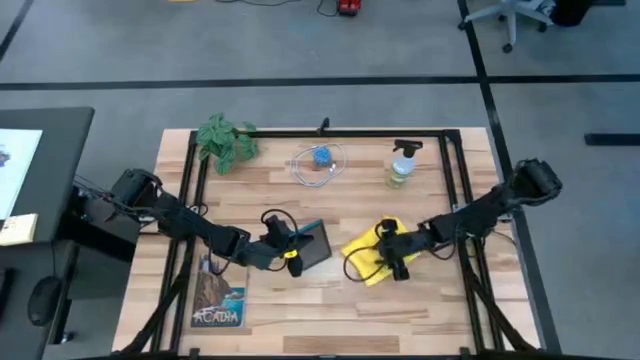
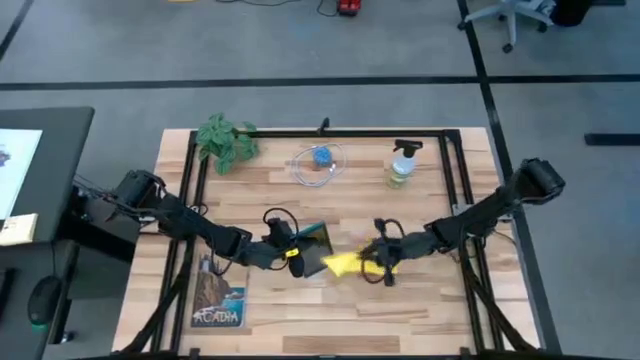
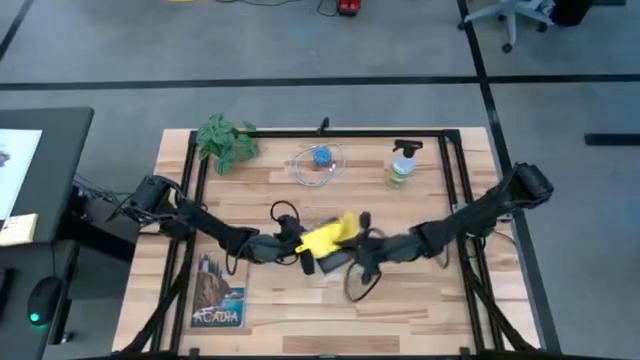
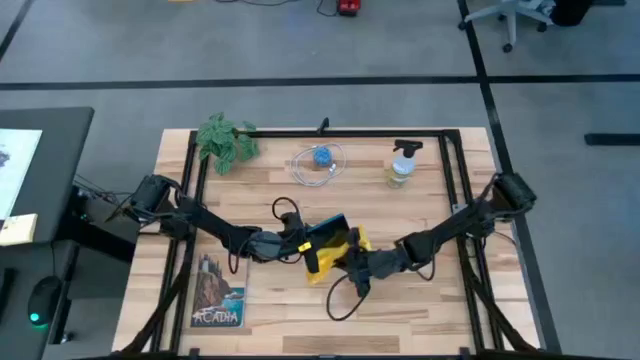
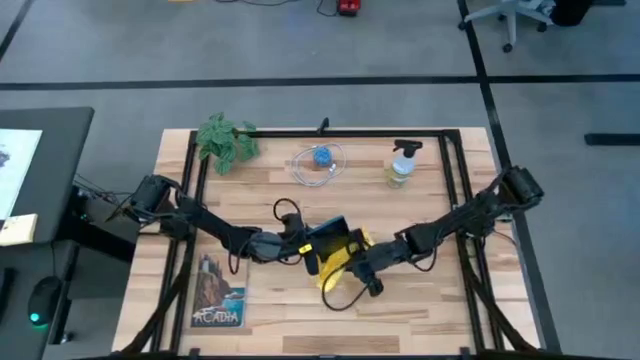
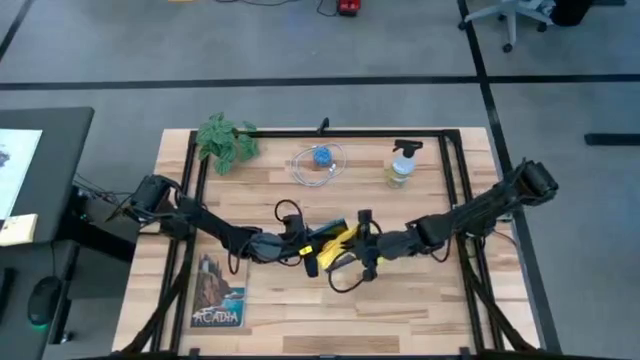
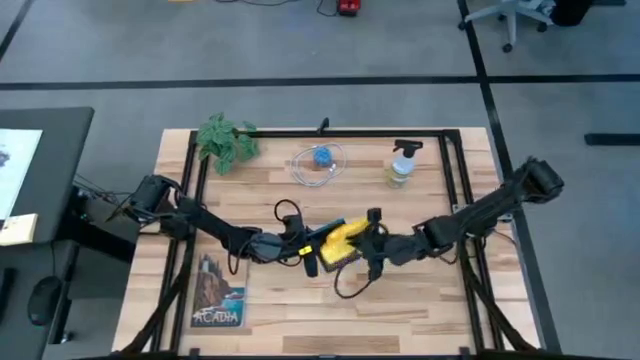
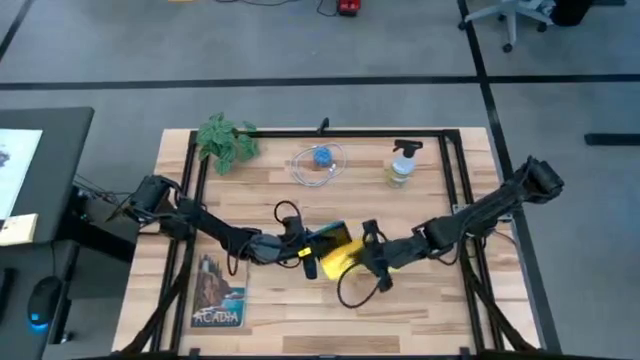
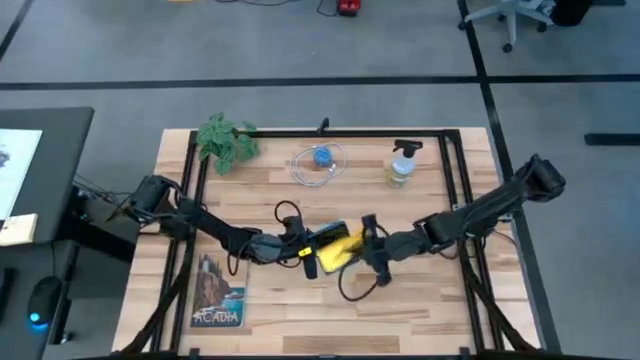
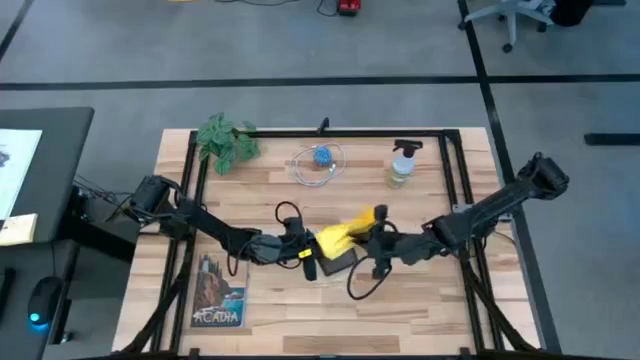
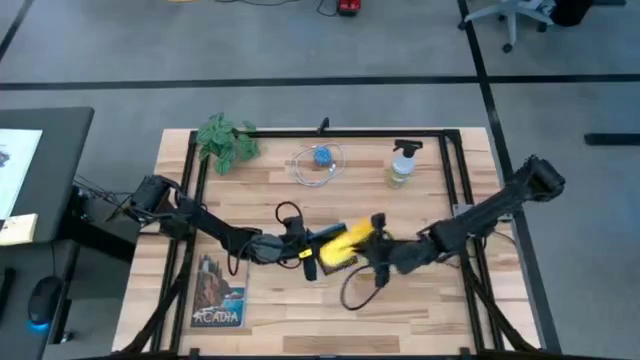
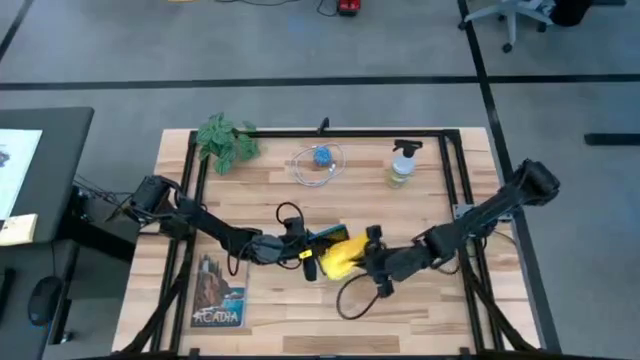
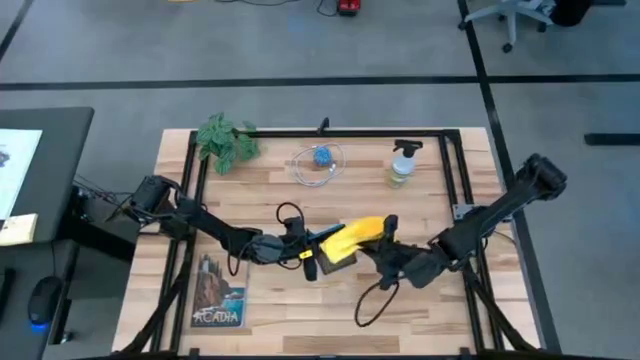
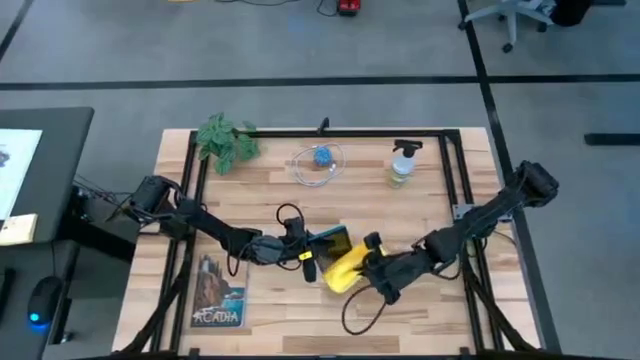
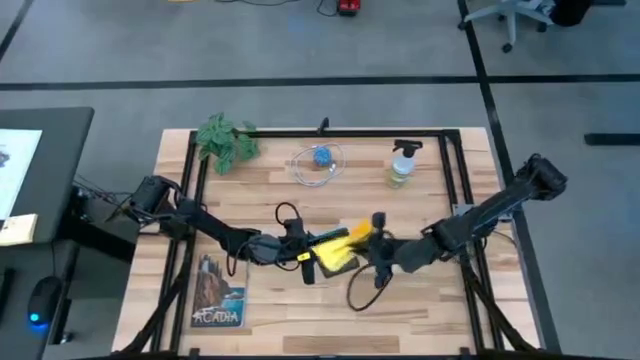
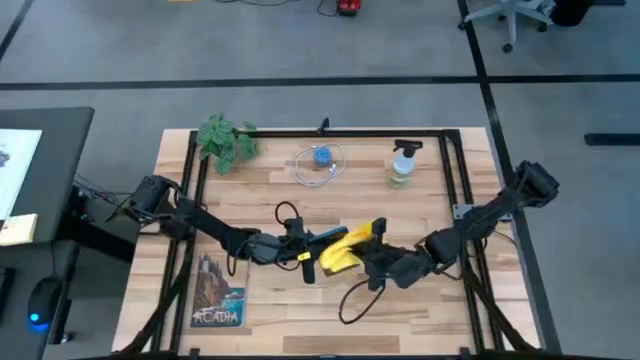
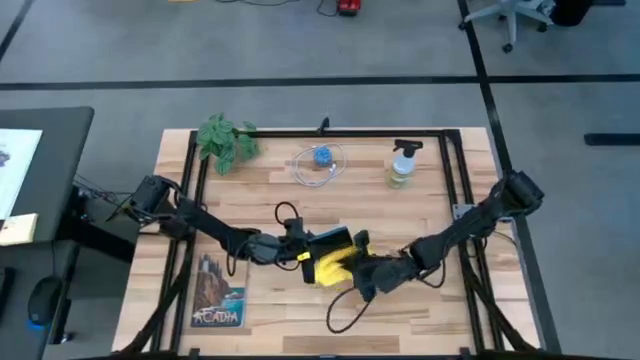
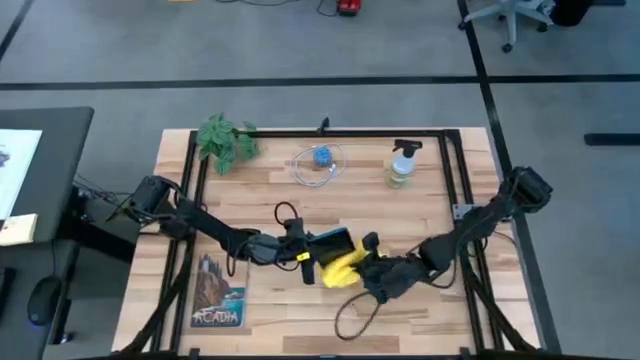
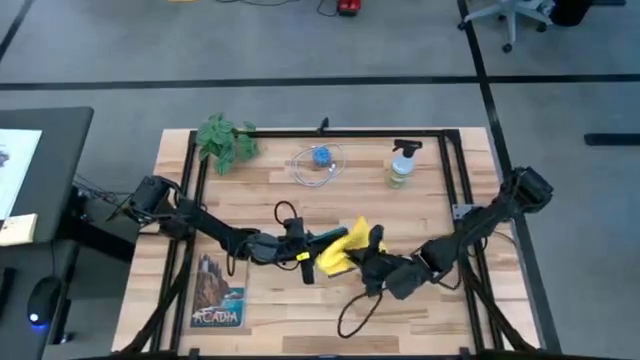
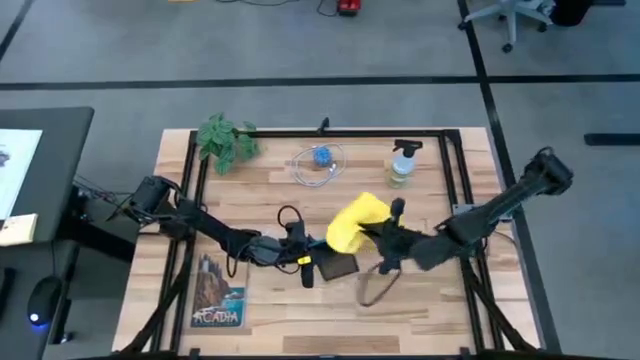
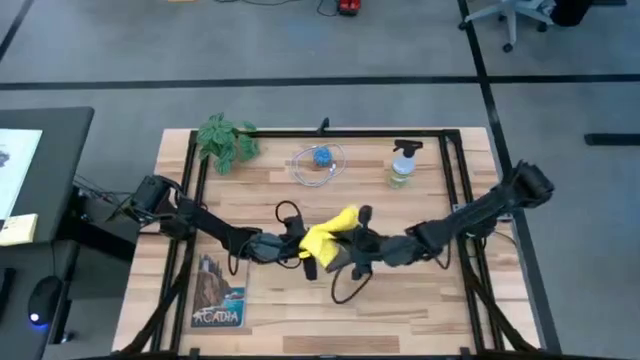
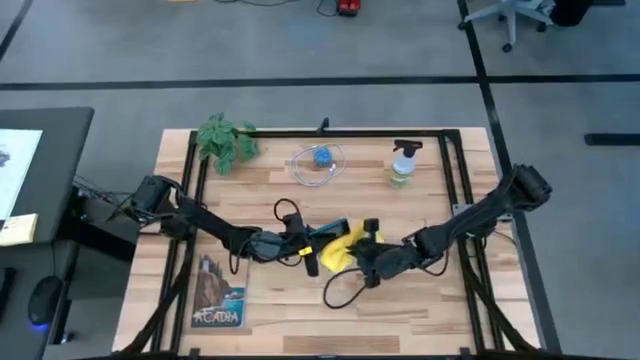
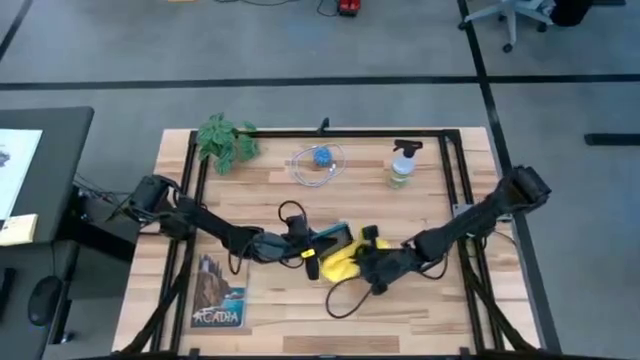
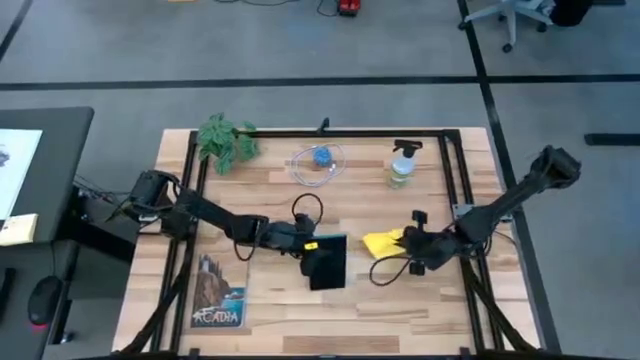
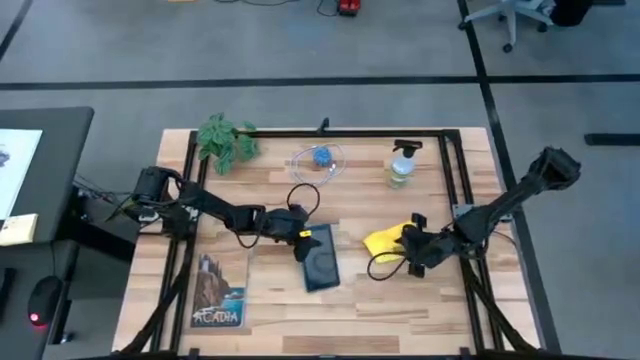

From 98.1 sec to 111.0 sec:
Task: Apply microfiber cloth
Wipe the back of the tablet with the yellow microfiber cloth

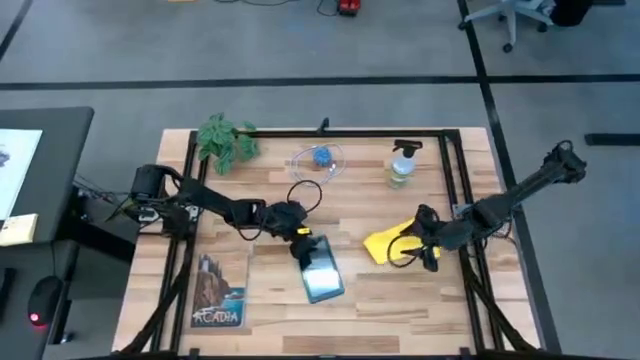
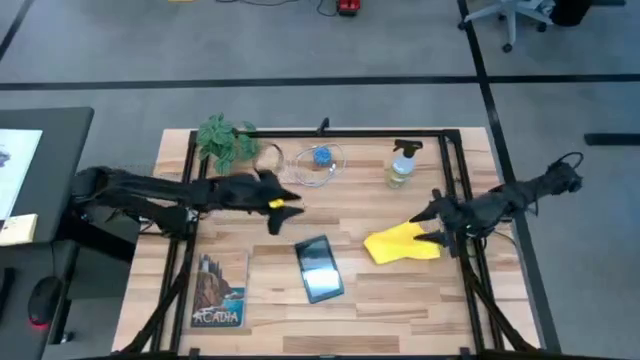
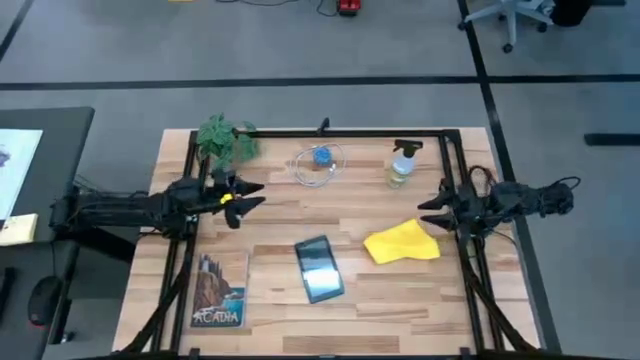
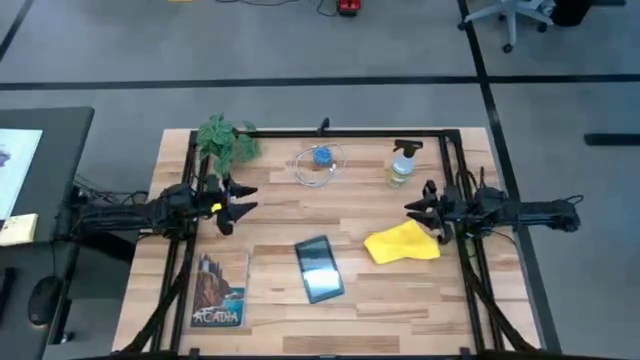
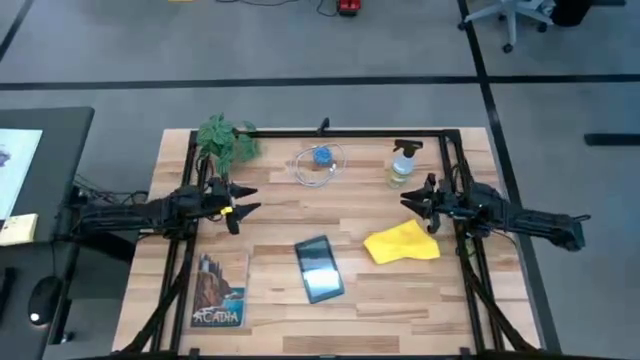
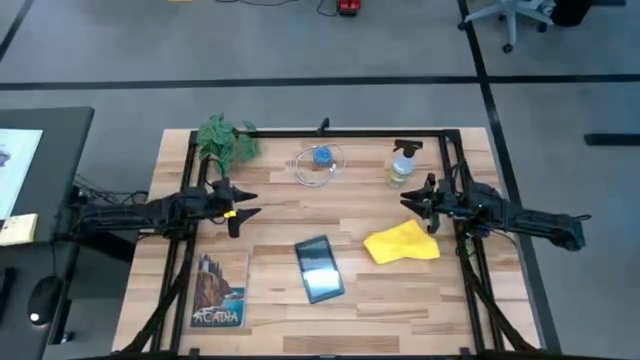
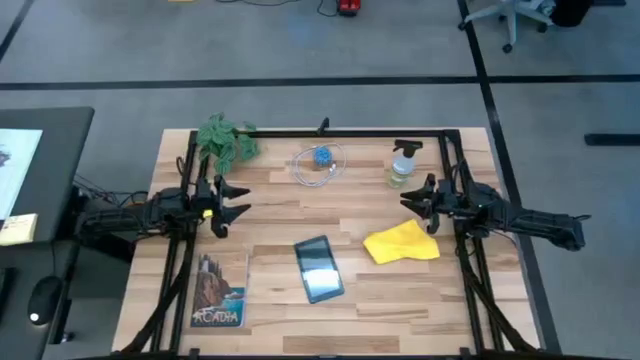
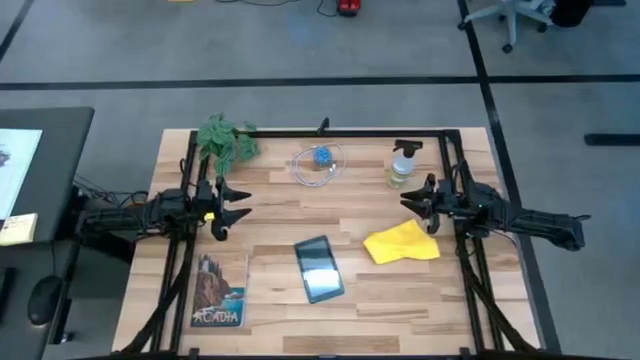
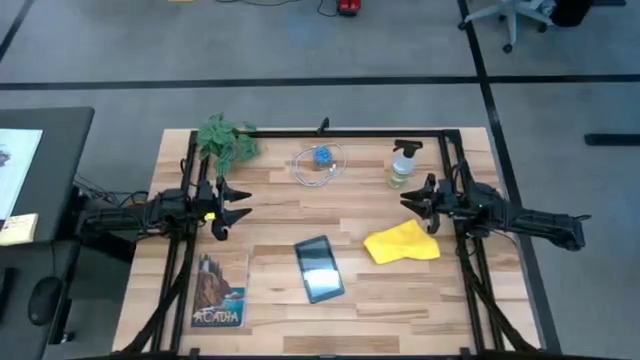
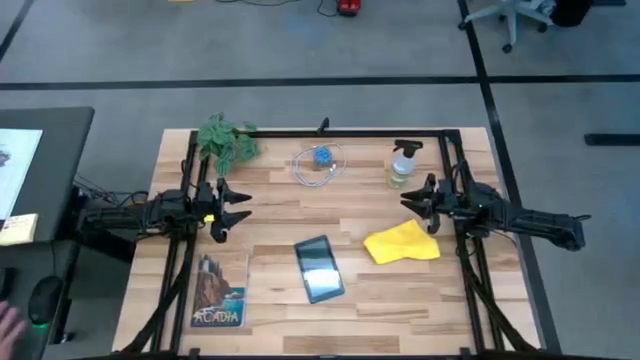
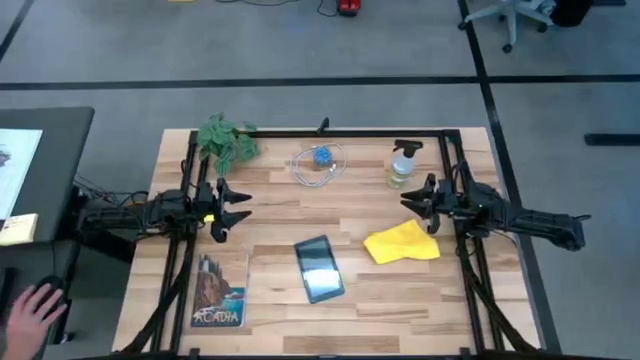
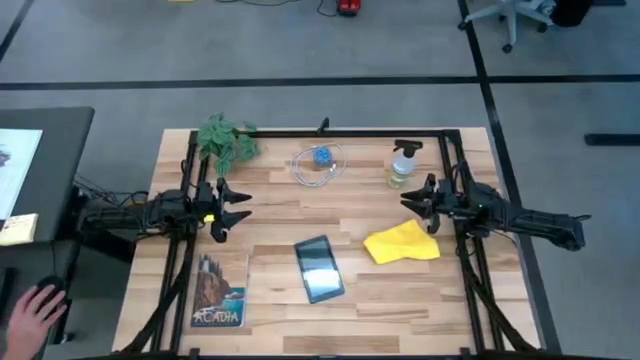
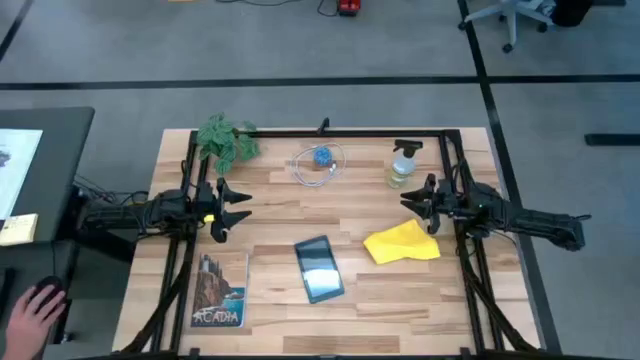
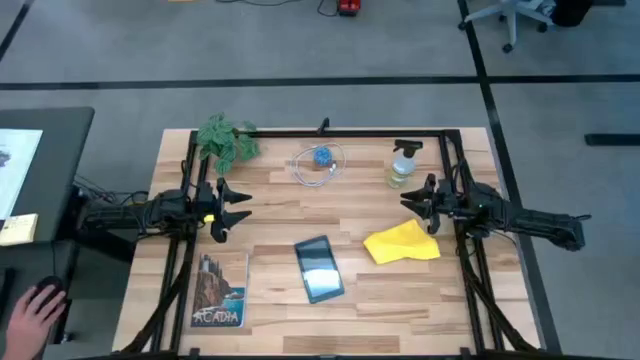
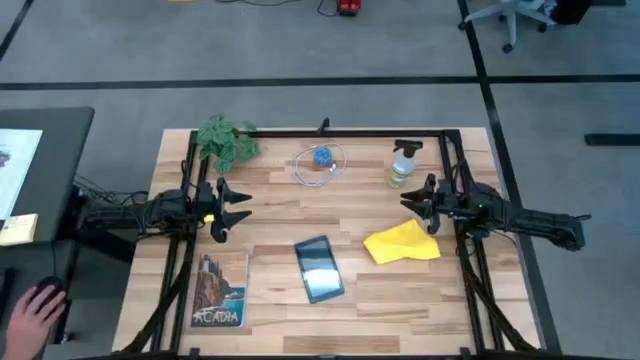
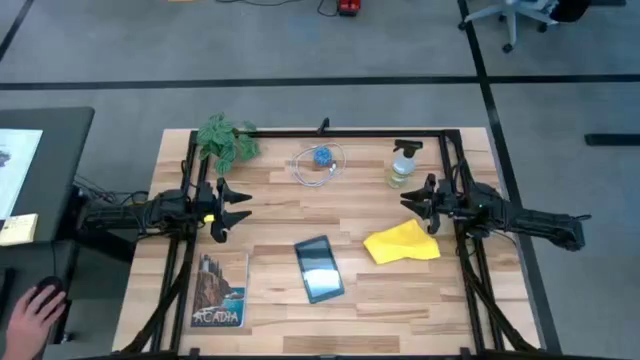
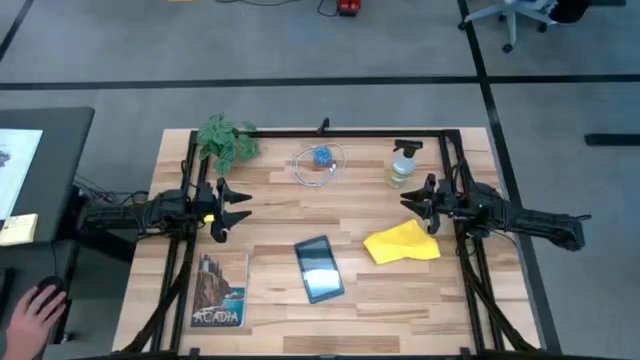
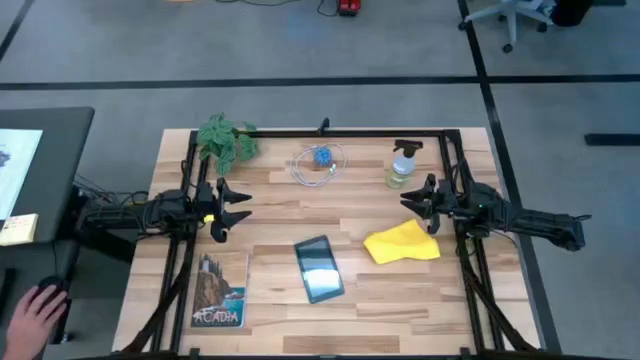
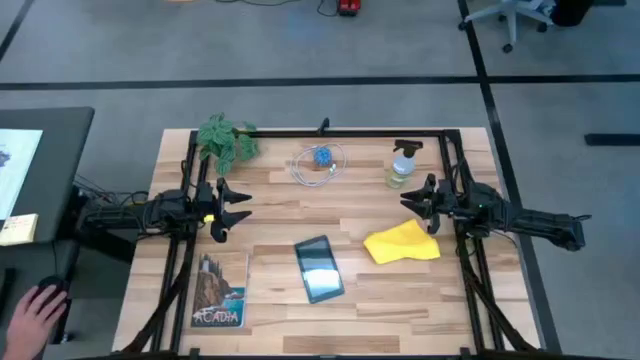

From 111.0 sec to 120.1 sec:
Return to Home Position
